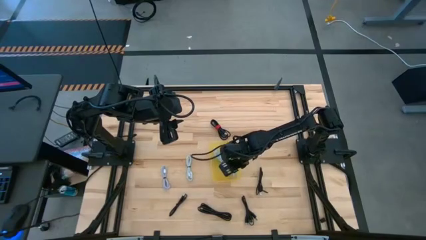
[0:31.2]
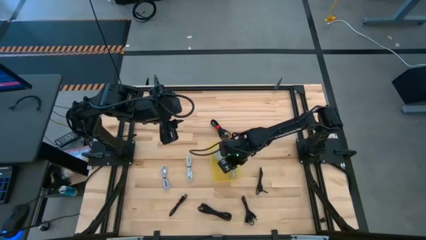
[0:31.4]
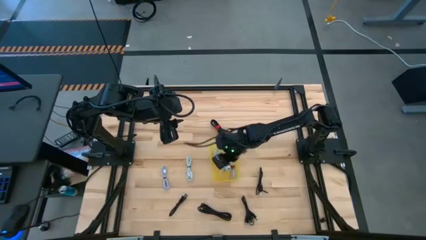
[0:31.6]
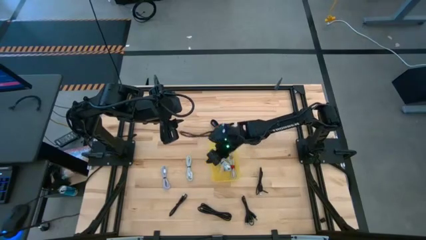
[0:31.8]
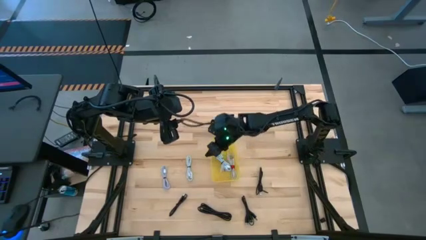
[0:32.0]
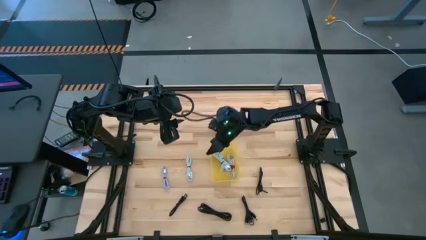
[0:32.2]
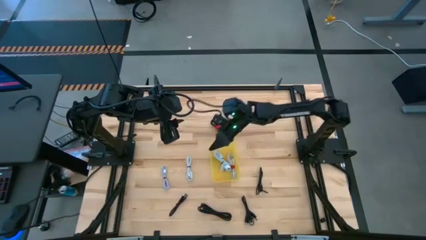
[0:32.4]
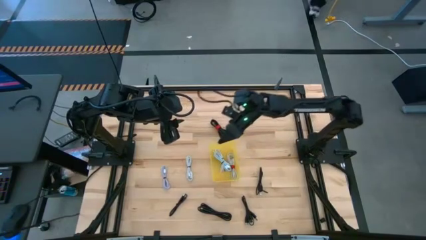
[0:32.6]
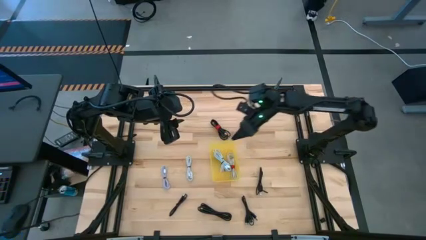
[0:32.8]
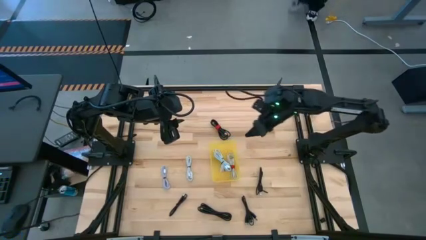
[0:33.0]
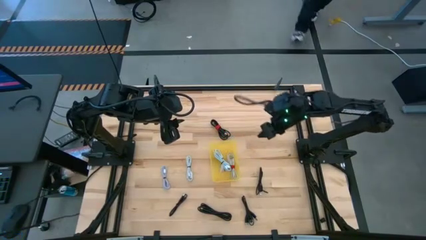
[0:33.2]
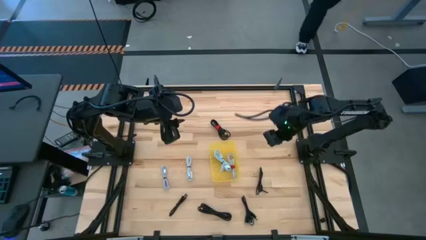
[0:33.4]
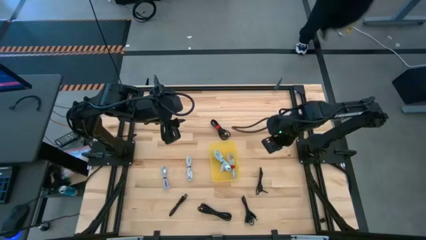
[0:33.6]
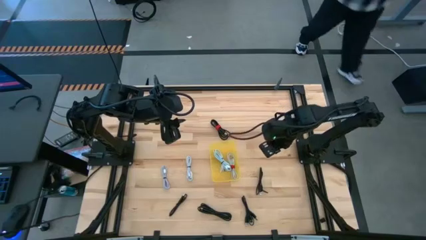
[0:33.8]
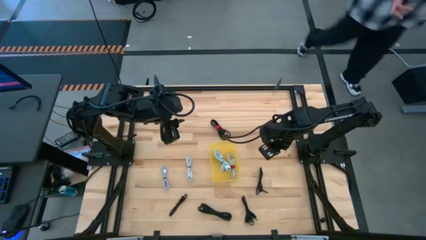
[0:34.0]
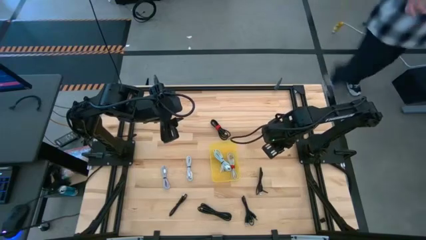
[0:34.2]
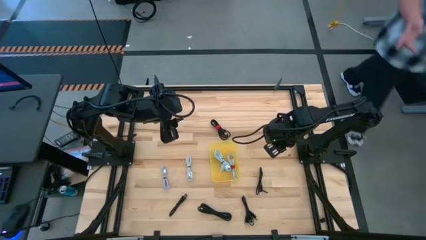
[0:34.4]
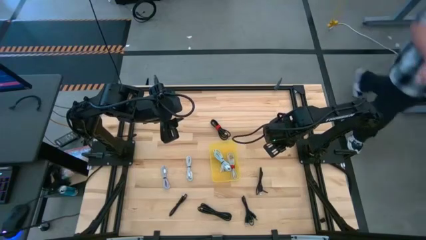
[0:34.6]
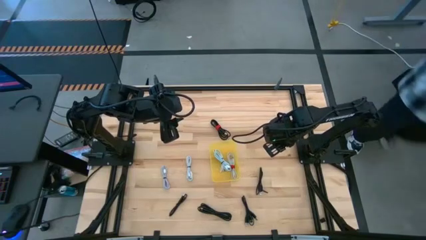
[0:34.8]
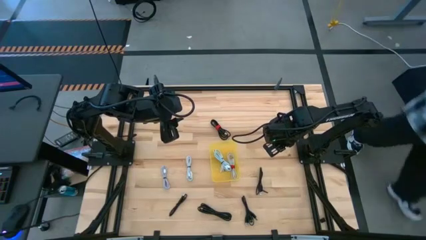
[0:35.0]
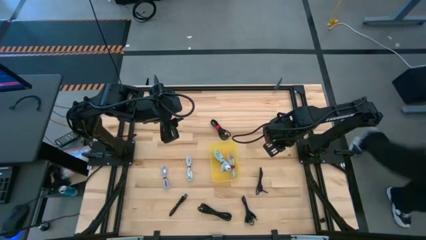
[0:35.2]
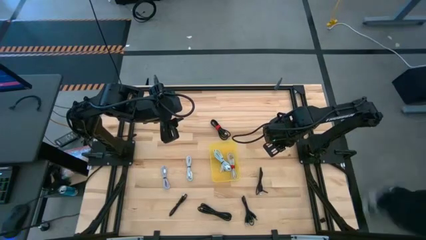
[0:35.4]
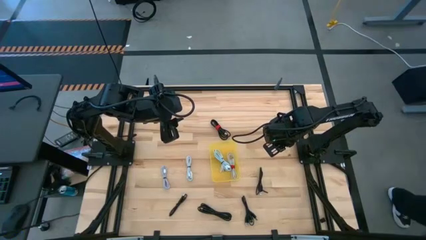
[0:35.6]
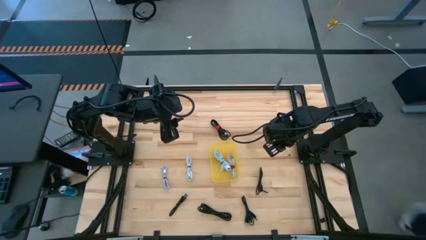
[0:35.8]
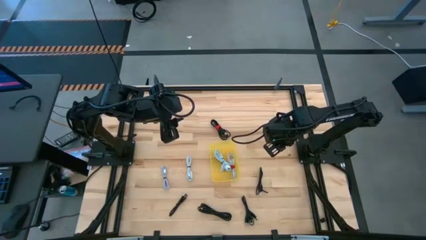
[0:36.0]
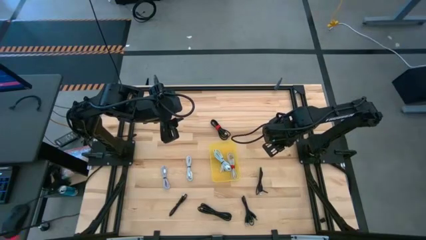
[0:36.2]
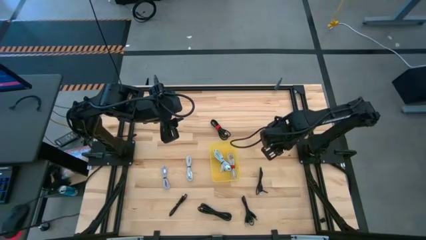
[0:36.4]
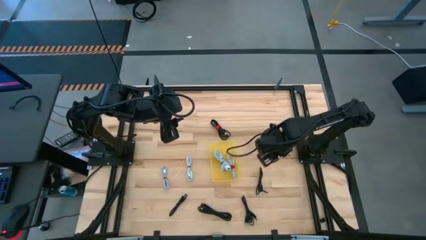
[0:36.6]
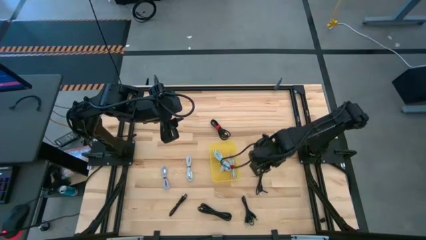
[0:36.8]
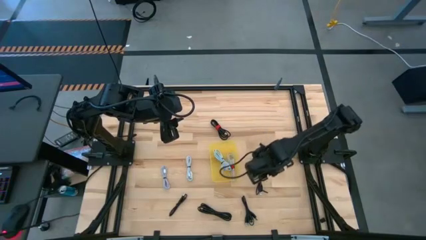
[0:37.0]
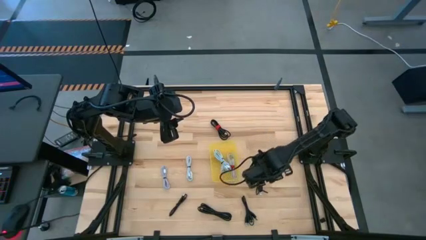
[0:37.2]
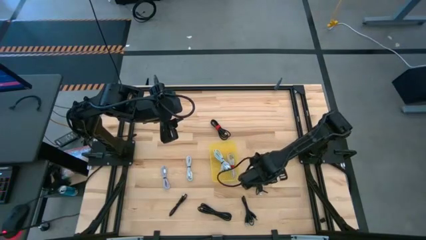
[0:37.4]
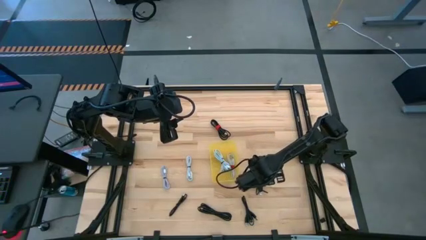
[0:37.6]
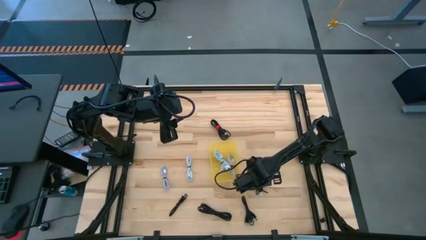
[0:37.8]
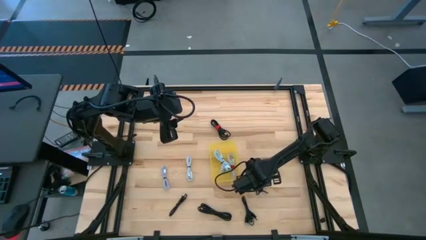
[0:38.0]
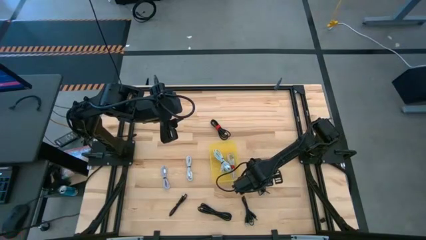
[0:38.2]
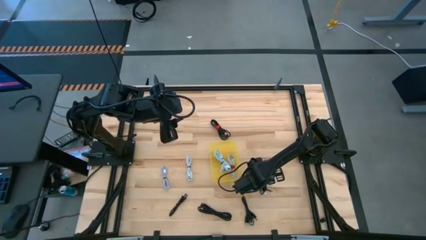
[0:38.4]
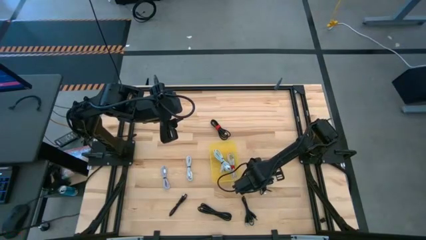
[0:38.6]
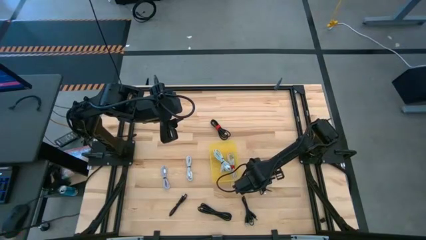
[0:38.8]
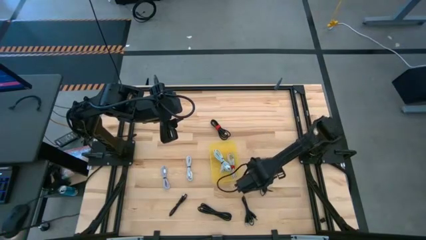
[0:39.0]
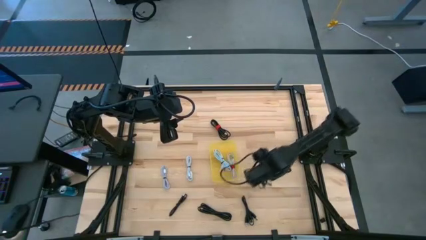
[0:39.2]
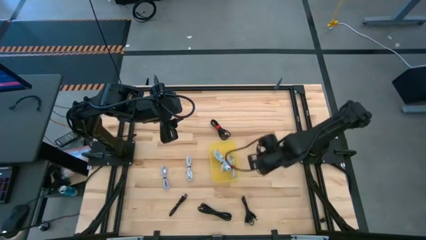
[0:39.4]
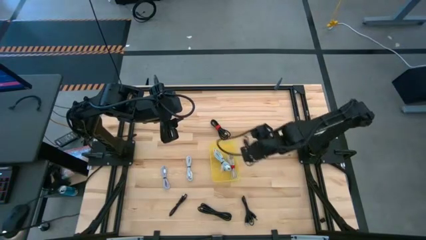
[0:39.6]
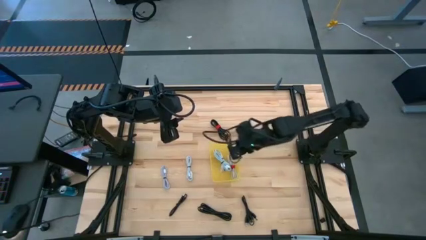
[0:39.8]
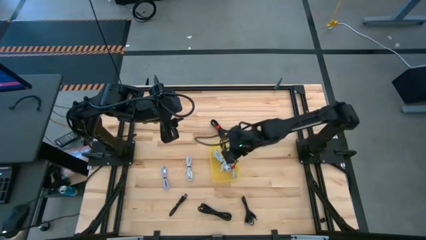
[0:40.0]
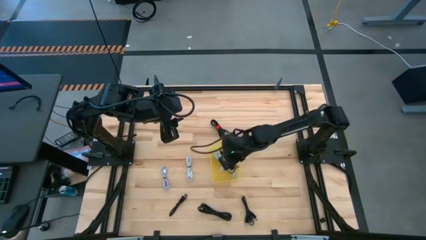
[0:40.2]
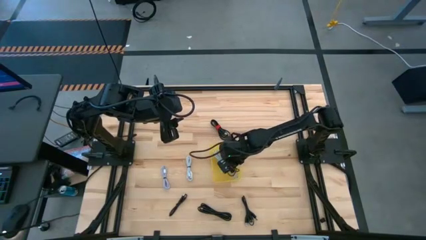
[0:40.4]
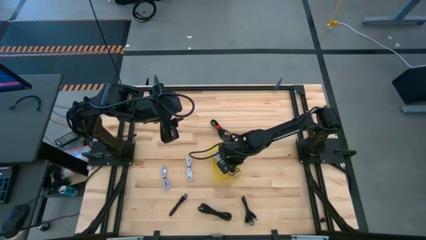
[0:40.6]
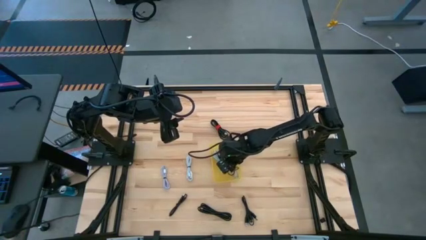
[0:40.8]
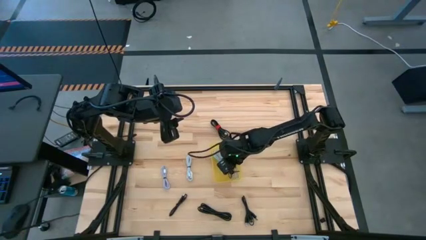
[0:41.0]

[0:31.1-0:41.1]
Task: Pick and place USB-C Cables
Put the black charger cable into the yellow bin

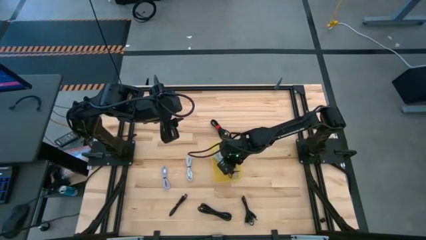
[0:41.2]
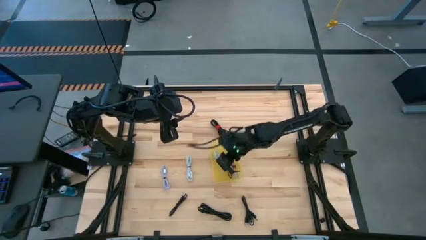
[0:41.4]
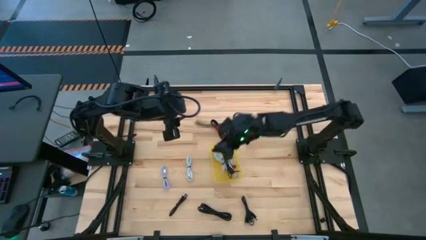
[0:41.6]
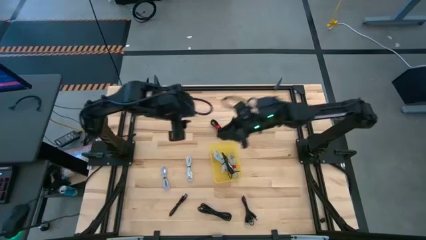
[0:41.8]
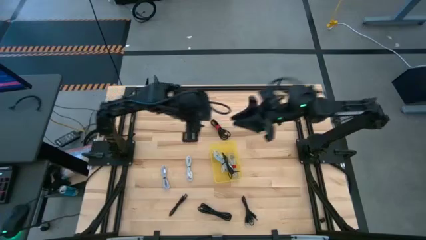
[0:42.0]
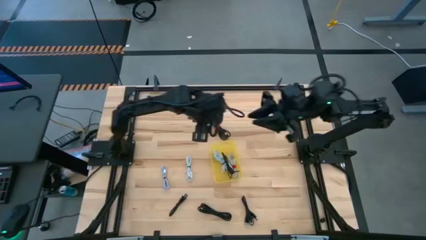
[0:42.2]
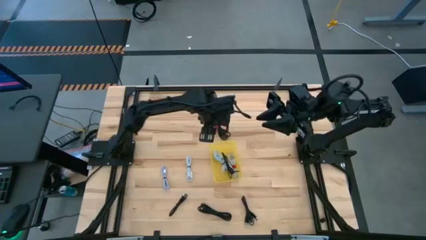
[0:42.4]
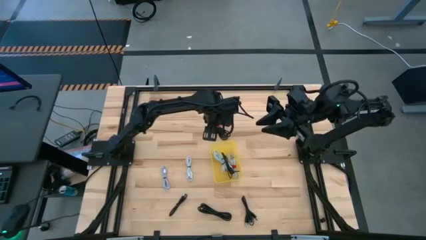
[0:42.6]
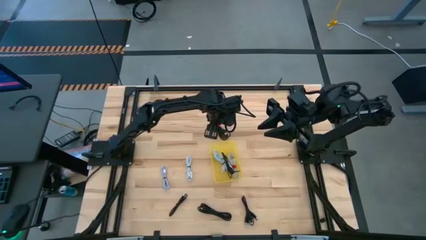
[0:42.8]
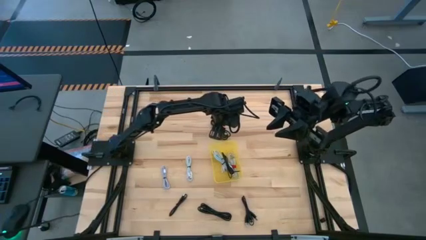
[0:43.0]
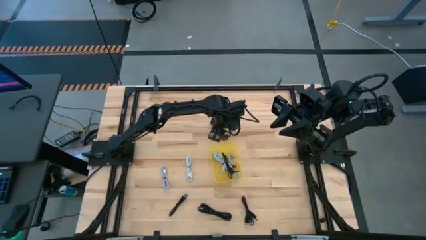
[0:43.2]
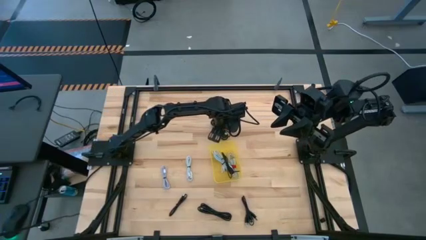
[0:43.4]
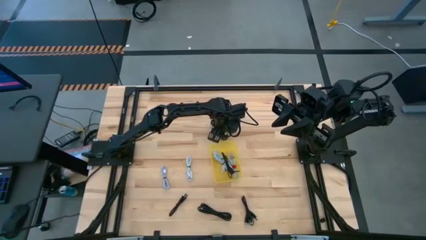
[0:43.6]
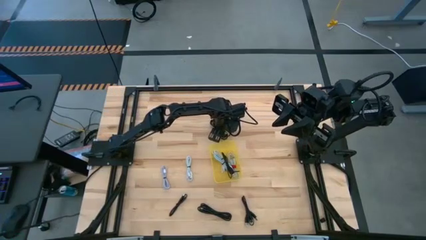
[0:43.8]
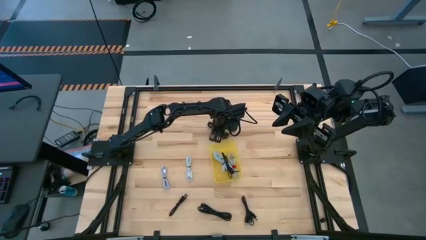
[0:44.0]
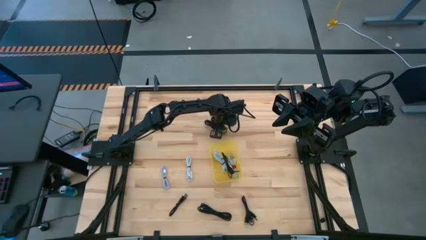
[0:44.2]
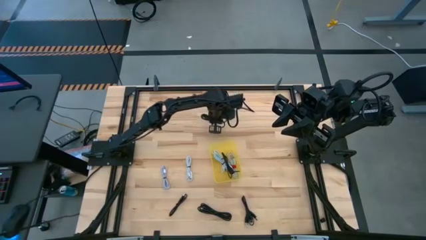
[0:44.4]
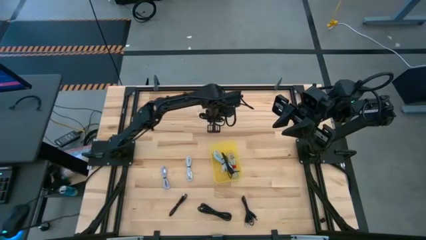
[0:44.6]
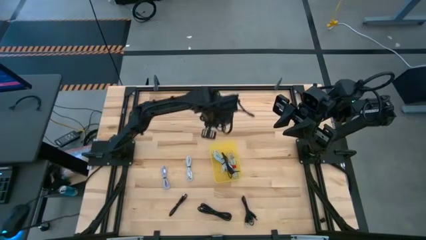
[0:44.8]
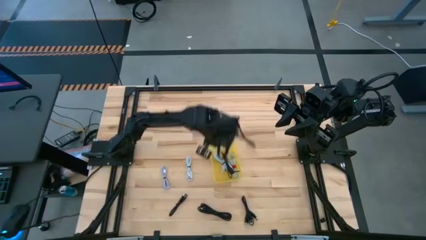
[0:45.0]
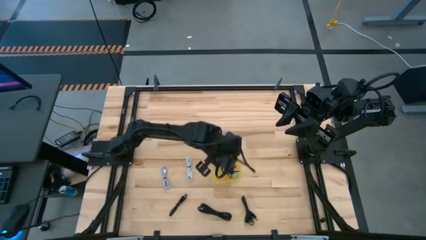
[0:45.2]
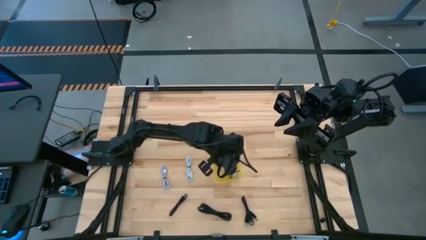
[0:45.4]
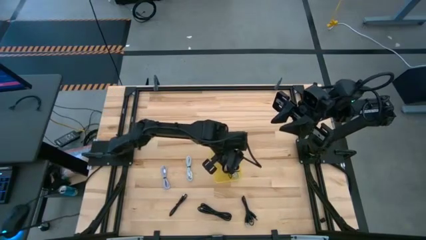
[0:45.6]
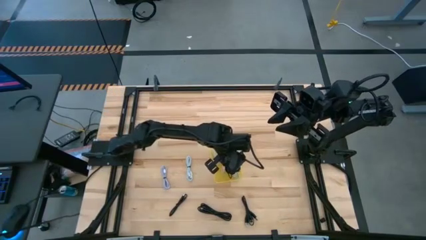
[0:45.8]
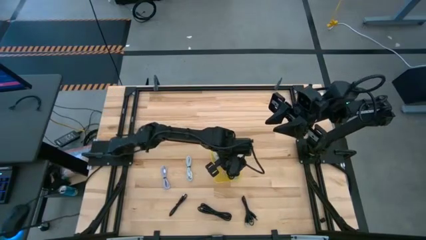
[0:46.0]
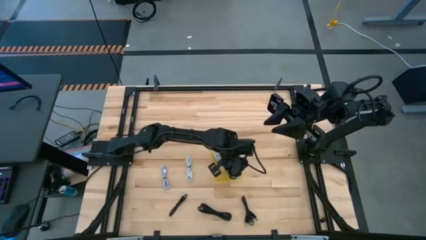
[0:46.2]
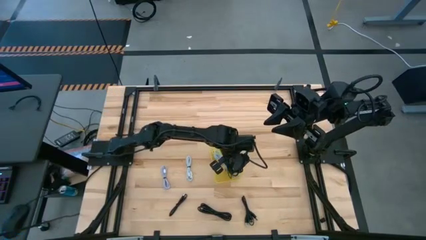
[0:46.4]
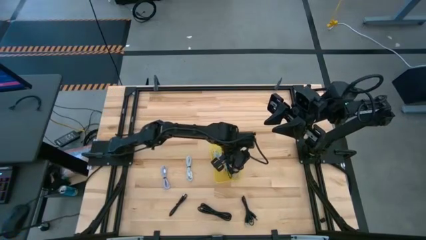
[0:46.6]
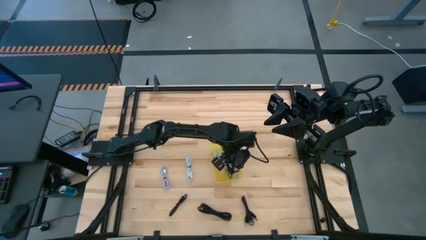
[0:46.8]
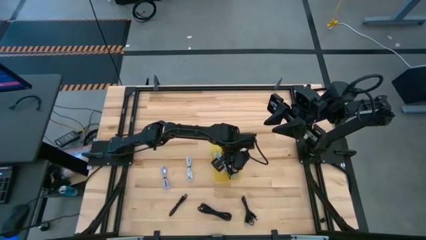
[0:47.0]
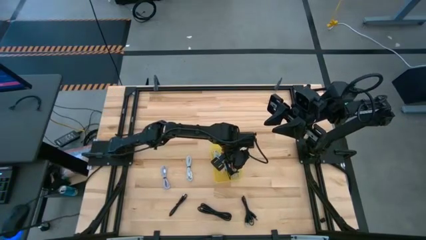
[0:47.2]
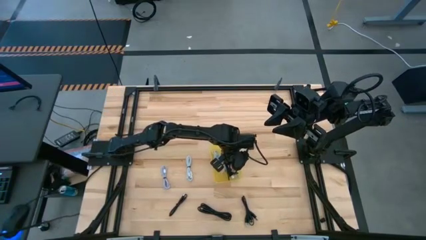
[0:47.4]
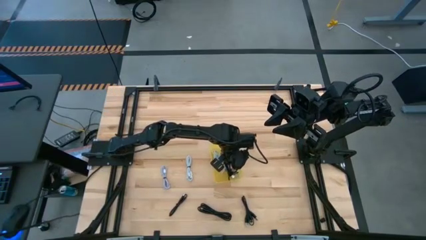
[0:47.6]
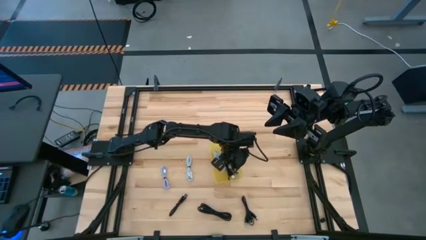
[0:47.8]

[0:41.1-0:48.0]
Put the black charger cable into the yellow bin
